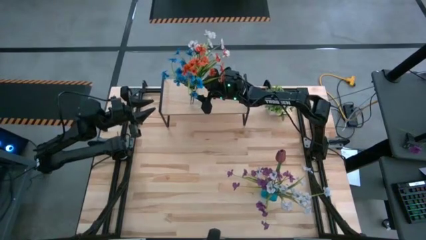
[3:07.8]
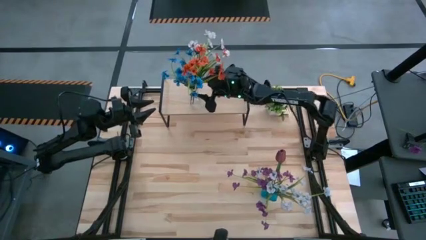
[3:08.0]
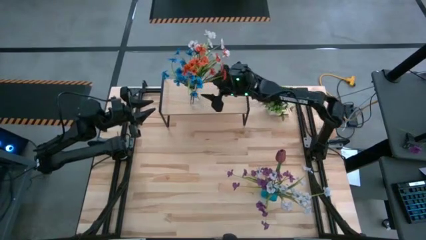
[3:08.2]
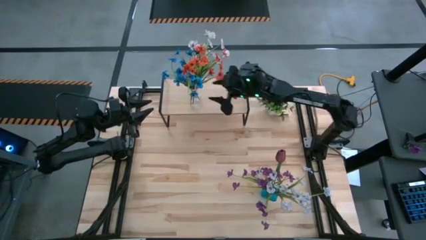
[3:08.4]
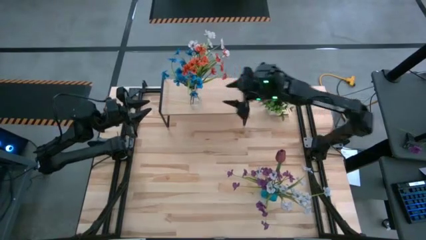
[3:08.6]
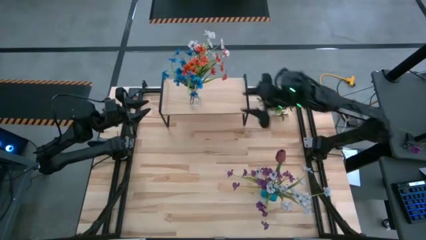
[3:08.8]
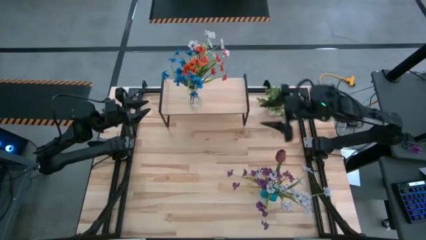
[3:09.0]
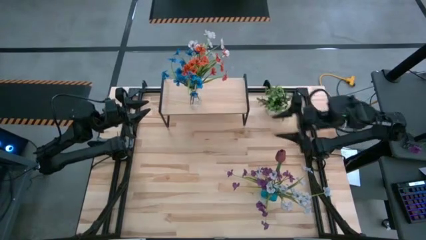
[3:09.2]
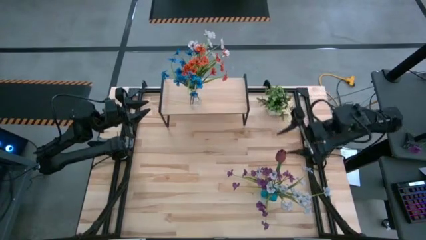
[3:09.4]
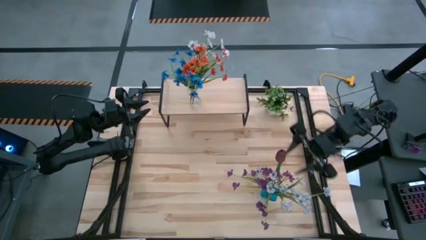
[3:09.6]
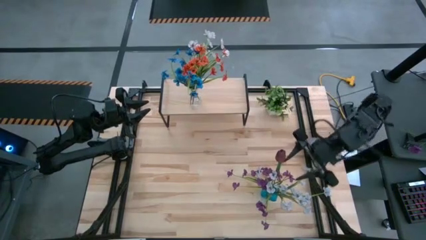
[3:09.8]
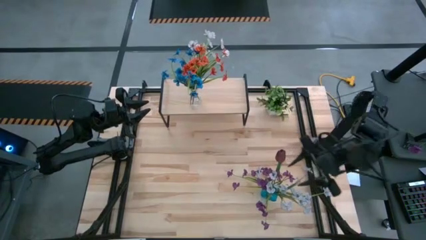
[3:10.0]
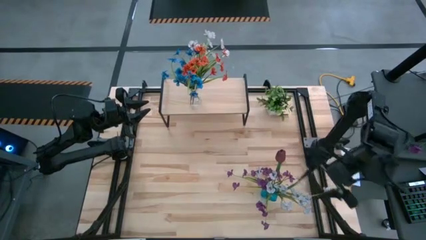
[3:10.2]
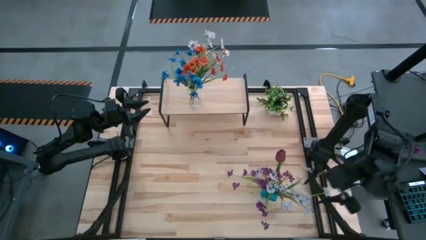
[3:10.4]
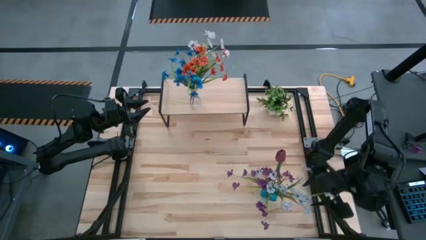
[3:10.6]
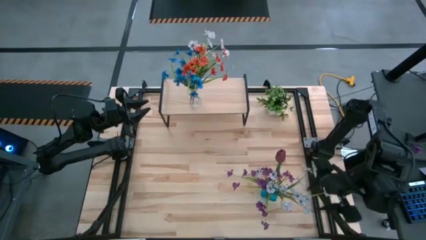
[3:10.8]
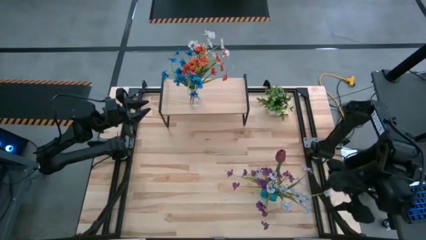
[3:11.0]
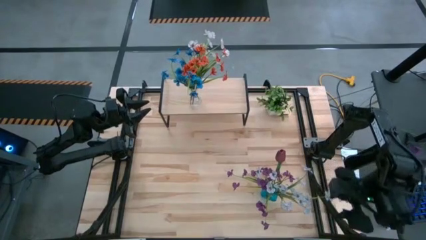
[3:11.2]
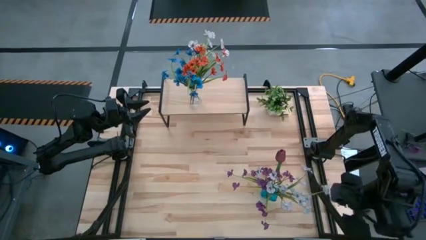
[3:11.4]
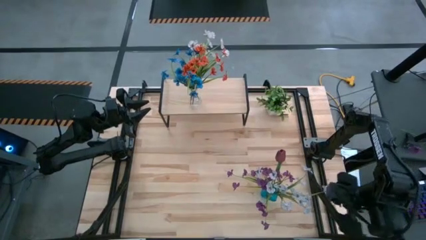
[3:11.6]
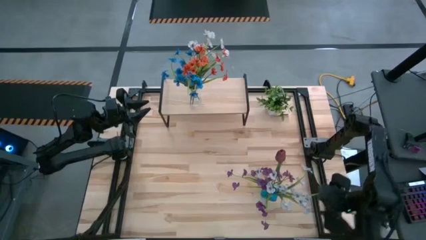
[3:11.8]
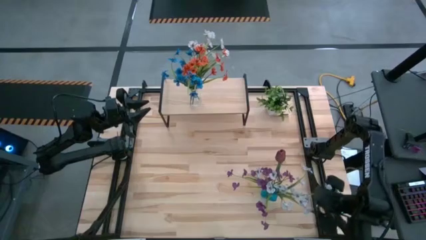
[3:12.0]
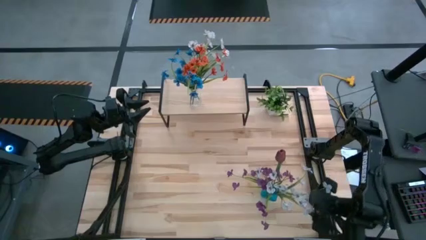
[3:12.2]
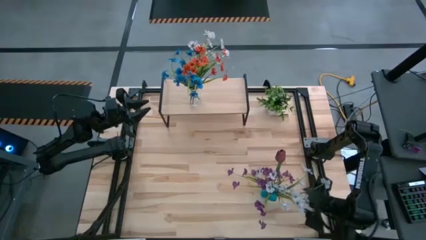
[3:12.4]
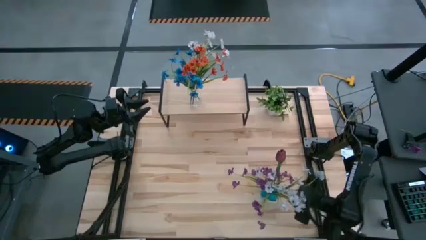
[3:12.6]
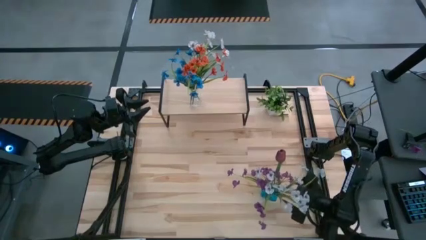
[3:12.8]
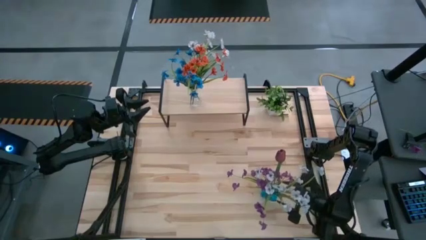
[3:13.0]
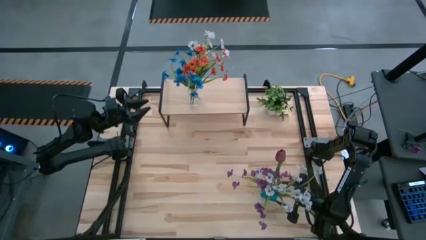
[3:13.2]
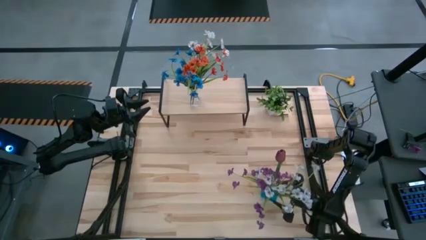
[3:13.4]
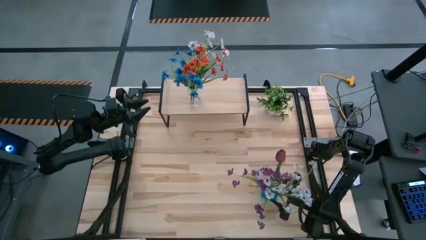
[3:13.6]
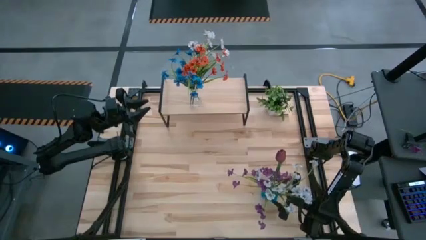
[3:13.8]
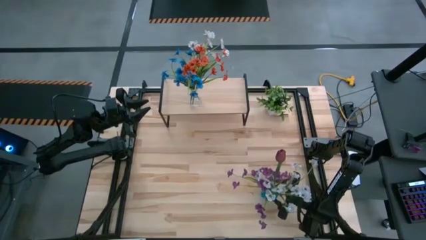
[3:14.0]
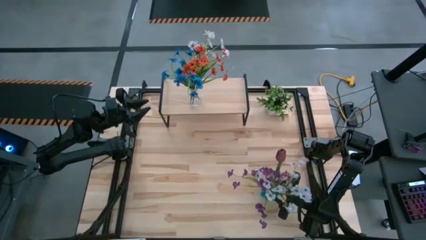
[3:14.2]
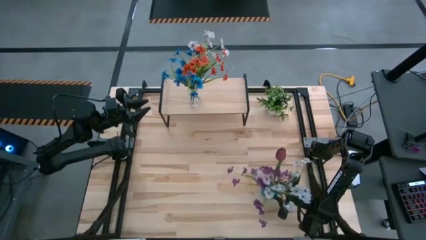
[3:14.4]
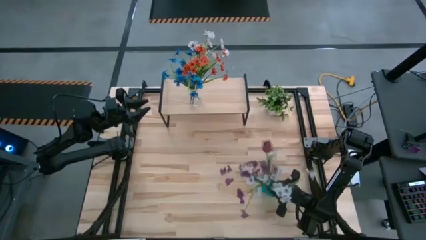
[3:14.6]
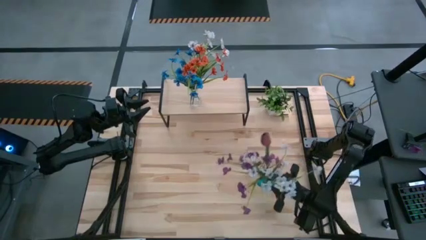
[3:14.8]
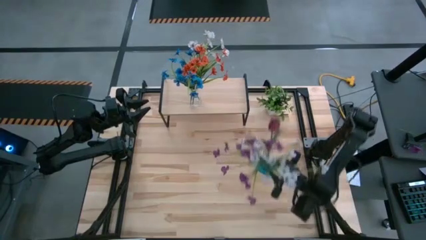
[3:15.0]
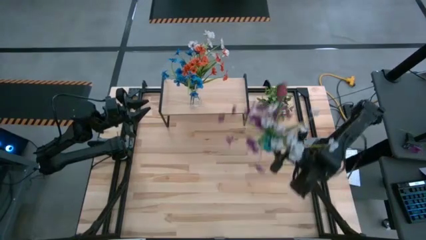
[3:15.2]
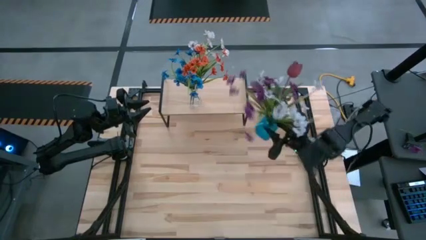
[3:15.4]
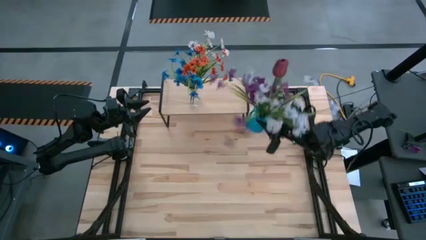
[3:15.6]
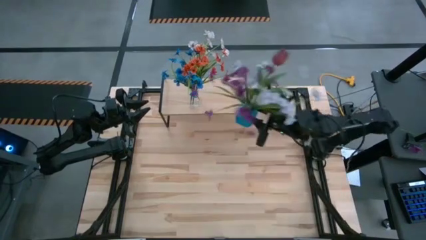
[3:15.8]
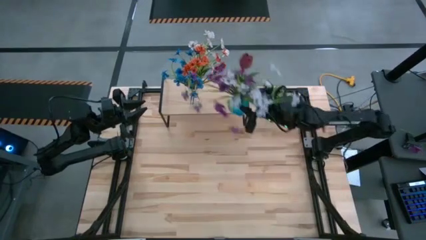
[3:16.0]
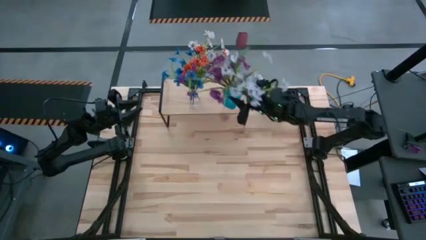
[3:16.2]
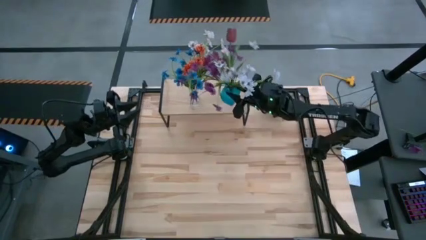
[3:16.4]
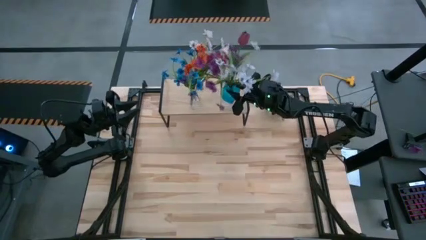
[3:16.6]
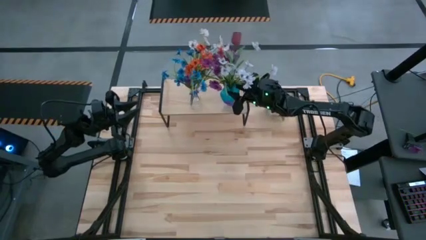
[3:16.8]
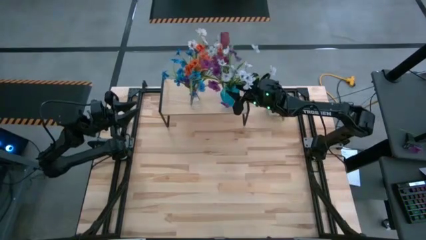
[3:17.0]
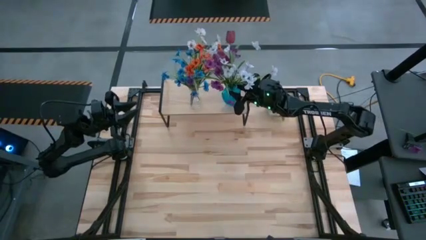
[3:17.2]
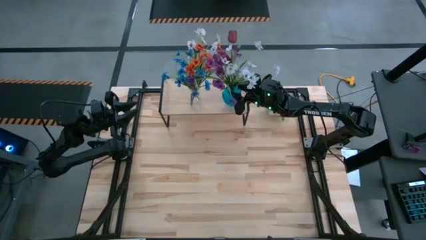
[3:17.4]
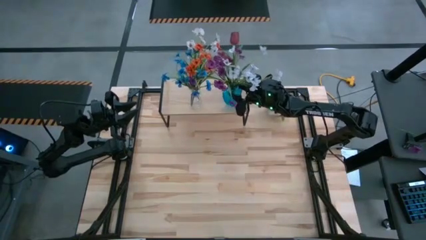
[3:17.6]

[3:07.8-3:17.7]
Task: Pick and place flowers into a vace then onto a shelf
Put the blue flower vase on the shelf

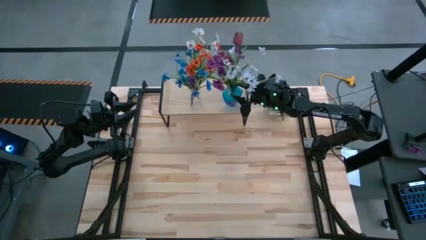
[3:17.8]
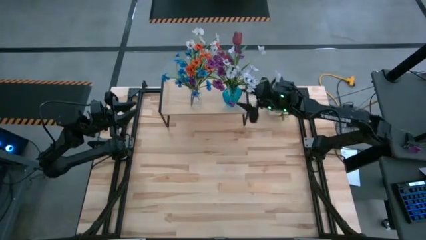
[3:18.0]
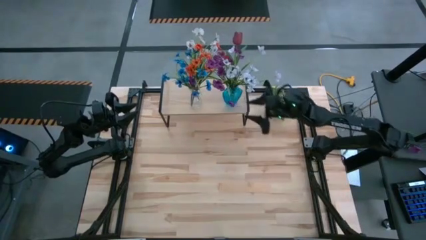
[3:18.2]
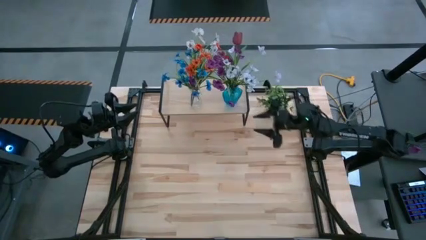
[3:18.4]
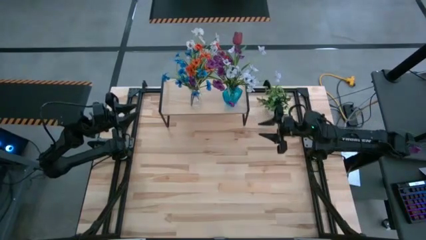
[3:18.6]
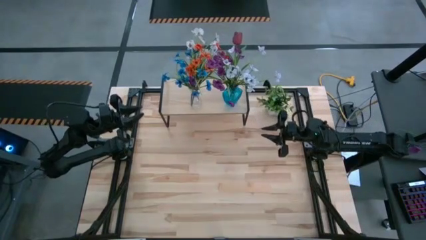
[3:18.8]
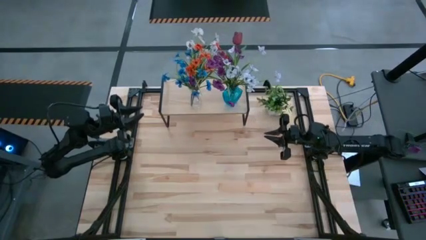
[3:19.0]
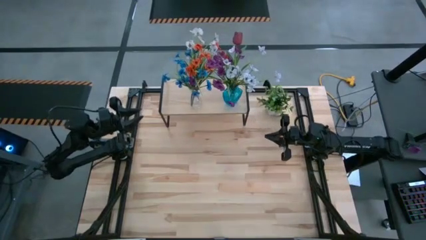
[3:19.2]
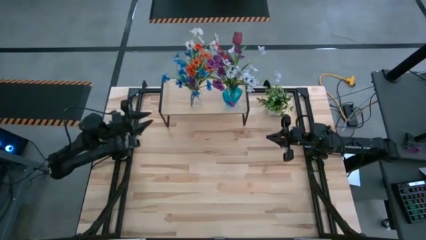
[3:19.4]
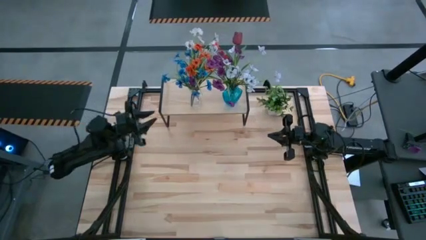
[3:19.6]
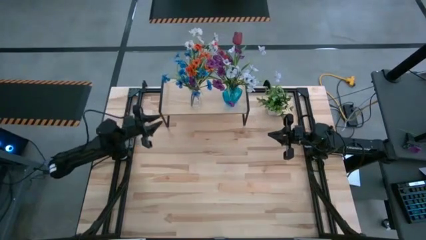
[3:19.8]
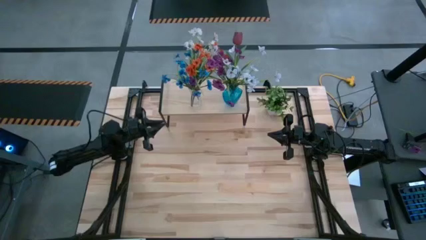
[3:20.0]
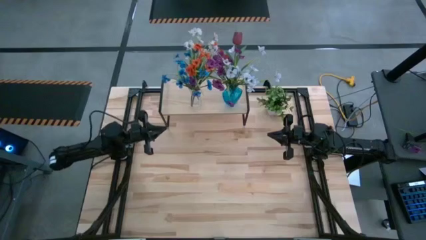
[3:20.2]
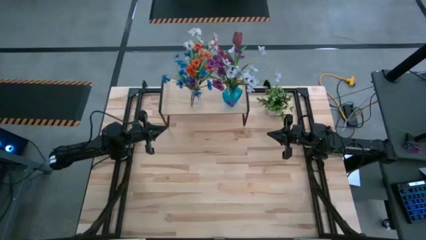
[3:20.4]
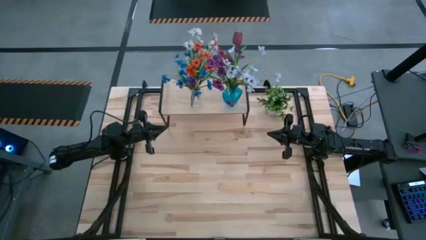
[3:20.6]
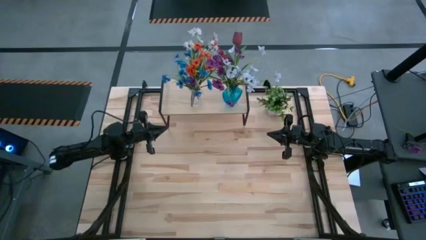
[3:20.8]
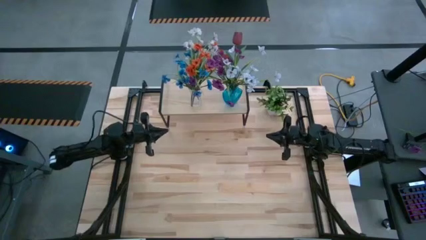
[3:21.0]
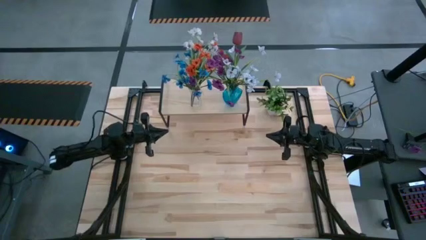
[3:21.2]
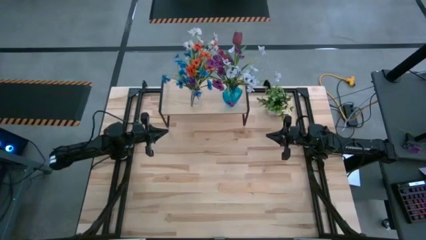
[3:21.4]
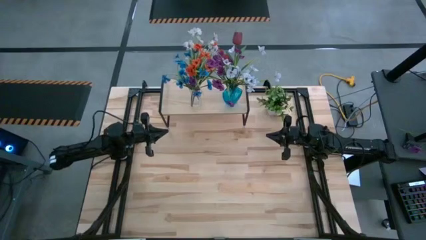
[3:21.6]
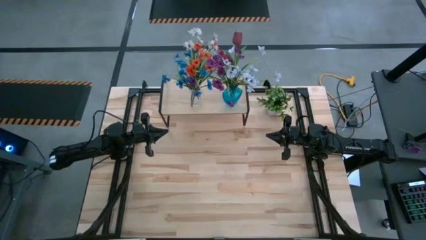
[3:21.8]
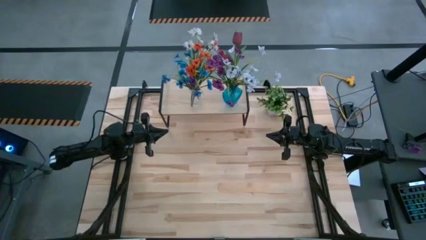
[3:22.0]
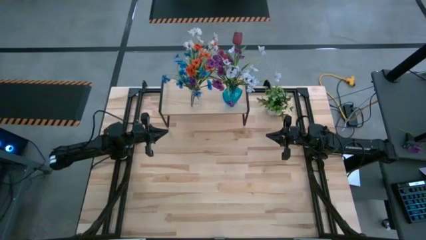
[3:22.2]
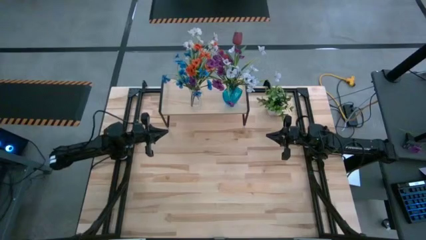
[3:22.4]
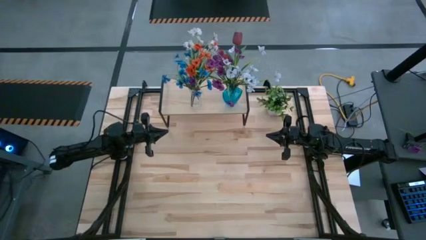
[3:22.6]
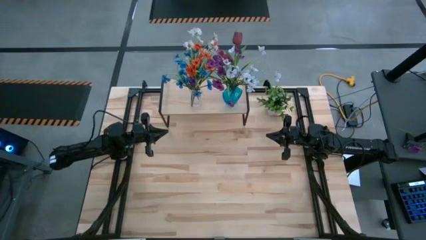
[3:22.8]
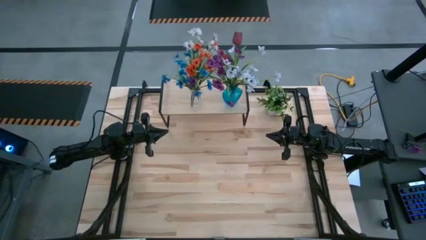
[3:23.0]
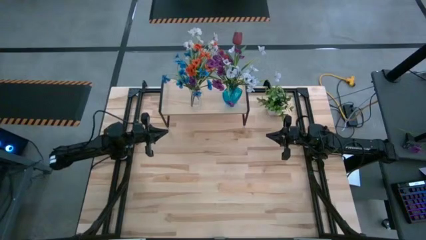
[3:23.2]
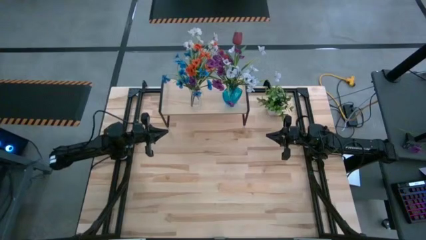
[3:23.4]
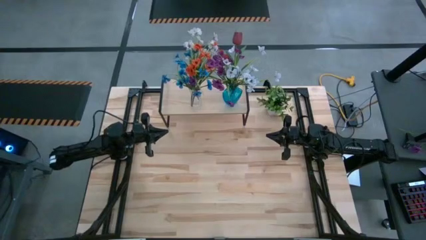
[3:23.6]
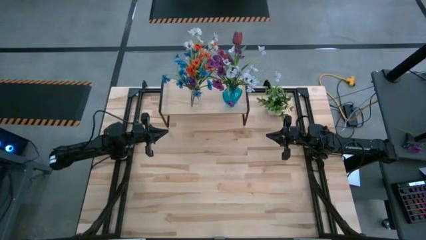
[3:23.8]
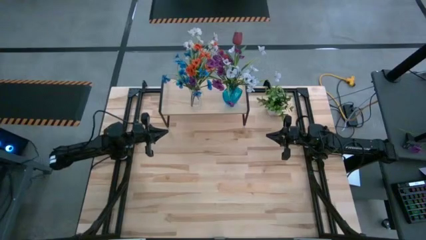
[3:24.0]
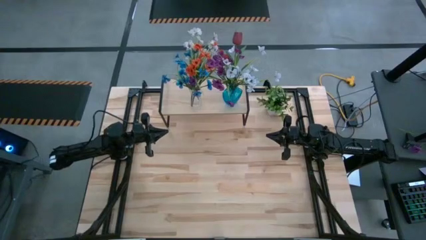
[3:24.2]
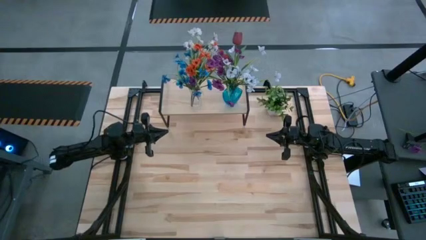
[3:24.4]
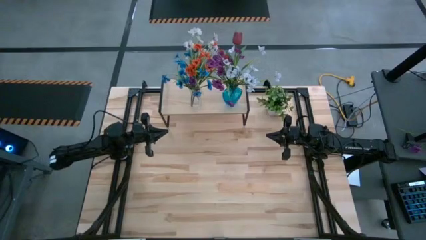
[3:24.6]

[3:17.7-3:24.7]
Return to Home Position

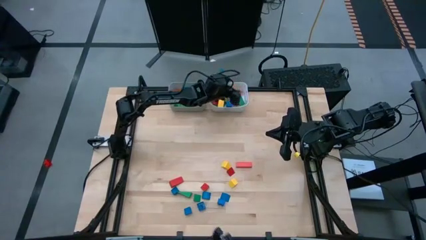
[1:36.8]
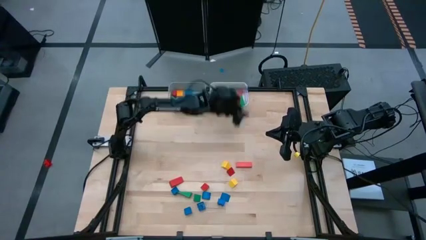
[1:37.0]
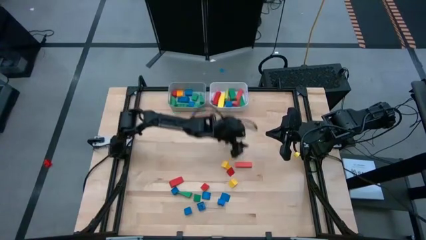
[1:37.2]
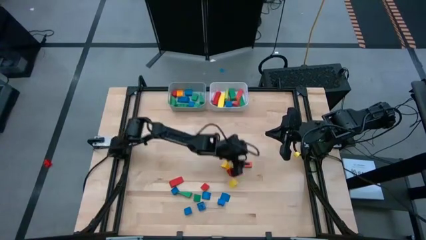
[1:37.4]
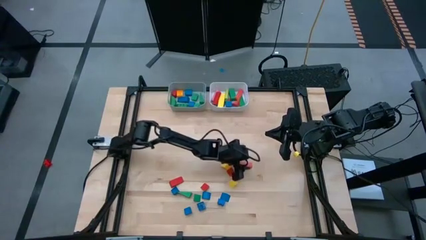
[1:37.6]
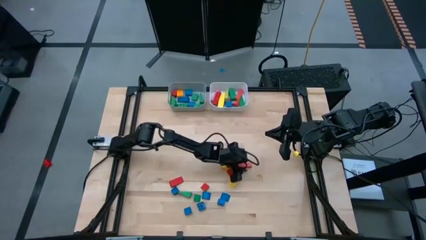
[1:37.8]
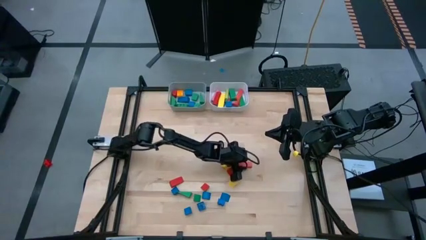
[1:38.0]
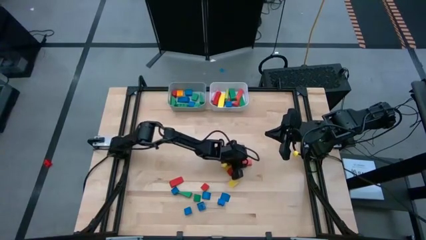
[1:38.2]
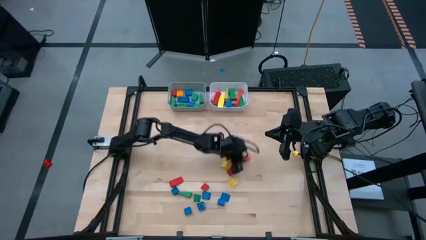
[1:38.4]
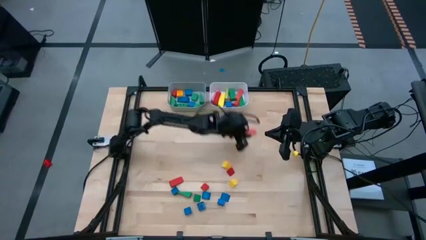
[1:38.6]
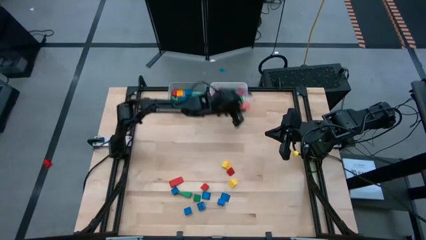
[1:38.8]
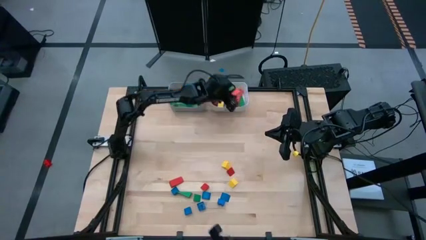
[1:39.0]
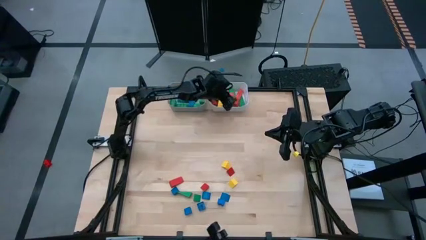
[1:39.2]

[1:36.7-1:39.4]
Task: Sort blocks by size
Put the orange rectangular block into the white bin
